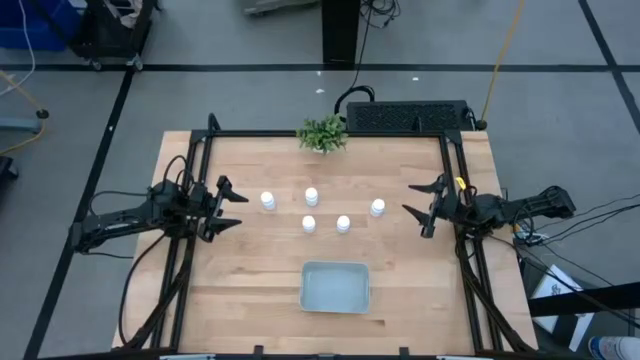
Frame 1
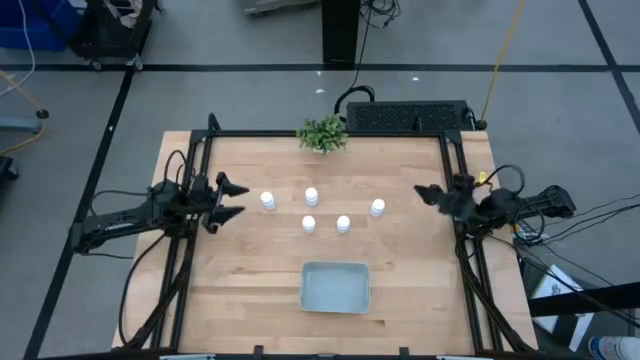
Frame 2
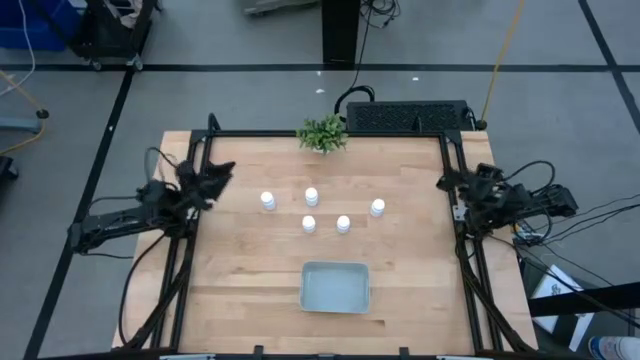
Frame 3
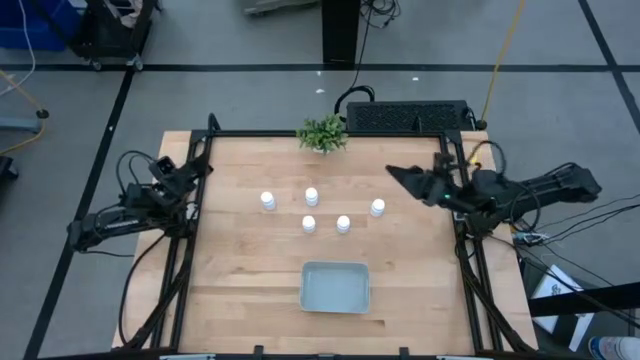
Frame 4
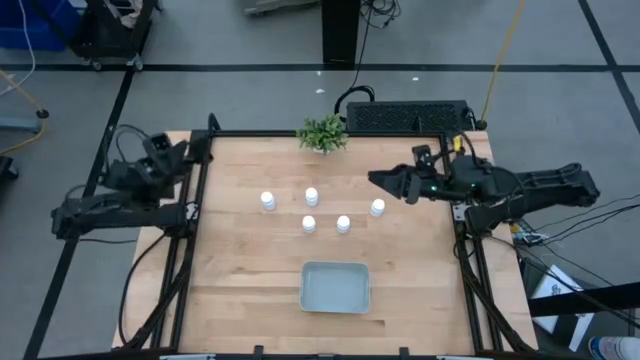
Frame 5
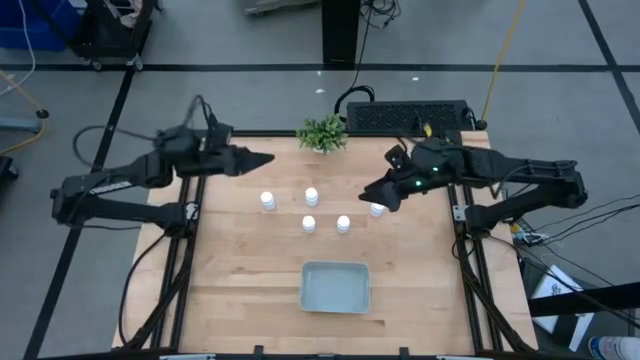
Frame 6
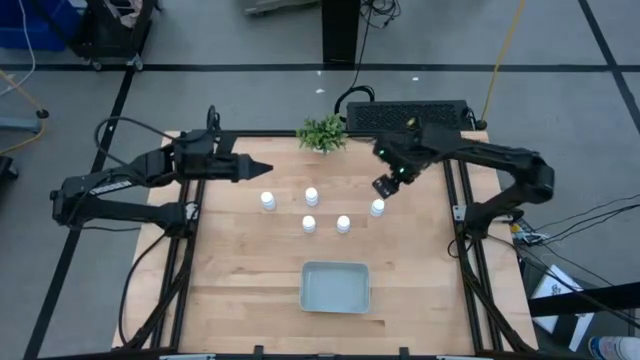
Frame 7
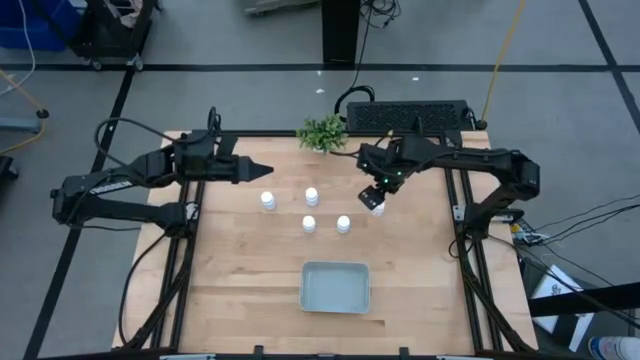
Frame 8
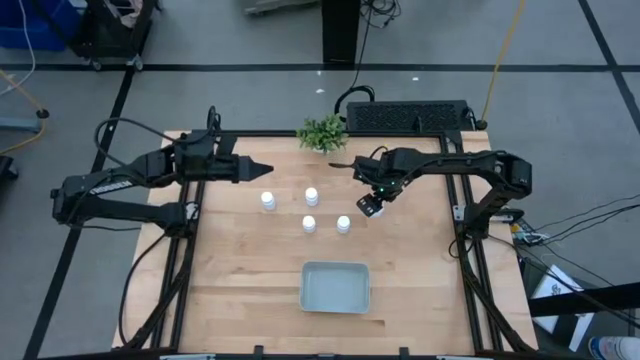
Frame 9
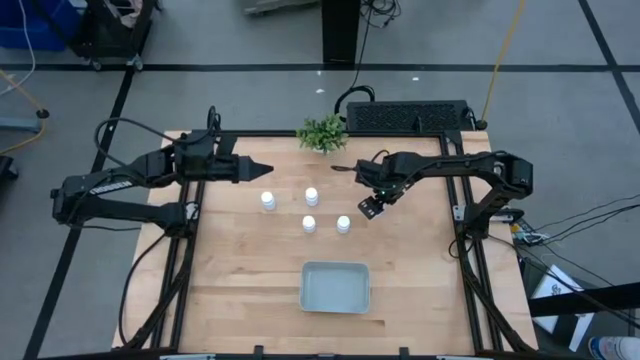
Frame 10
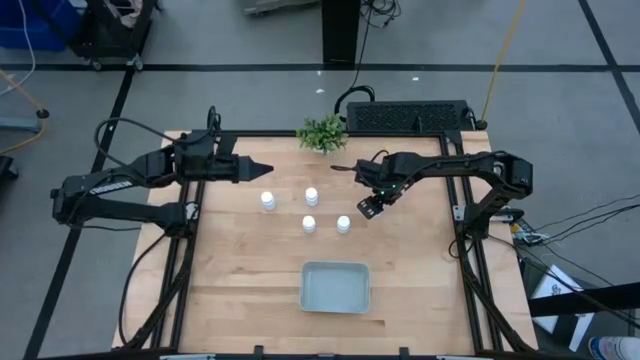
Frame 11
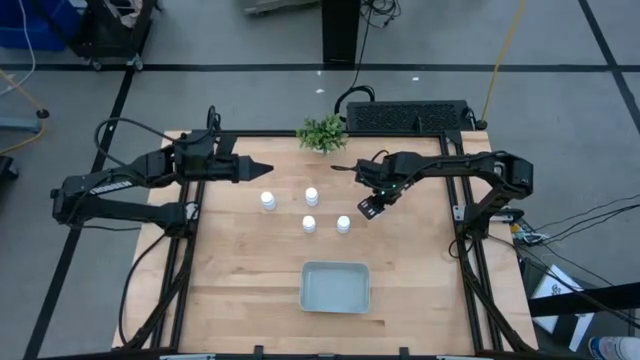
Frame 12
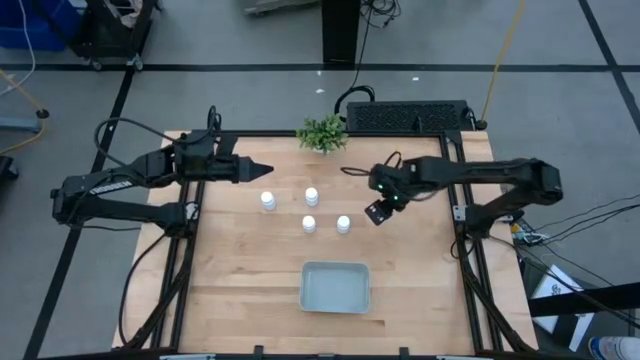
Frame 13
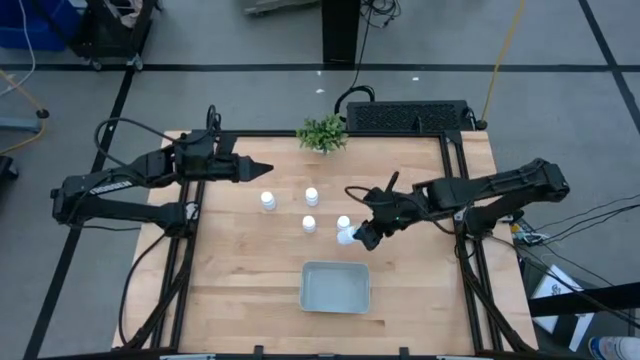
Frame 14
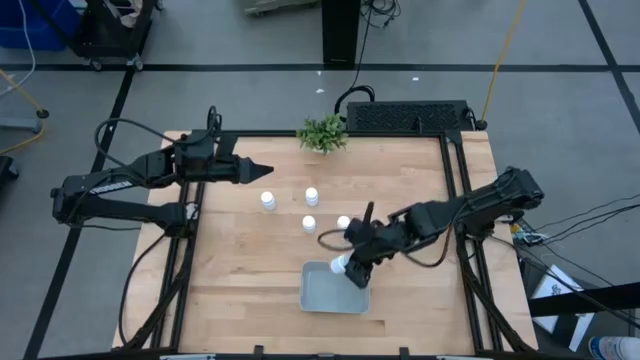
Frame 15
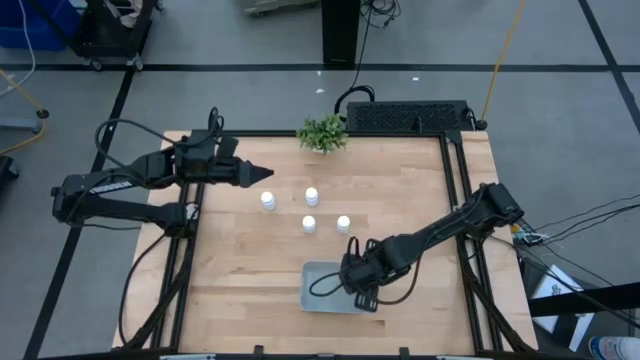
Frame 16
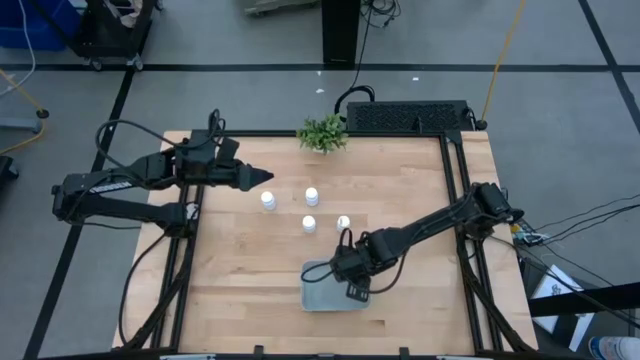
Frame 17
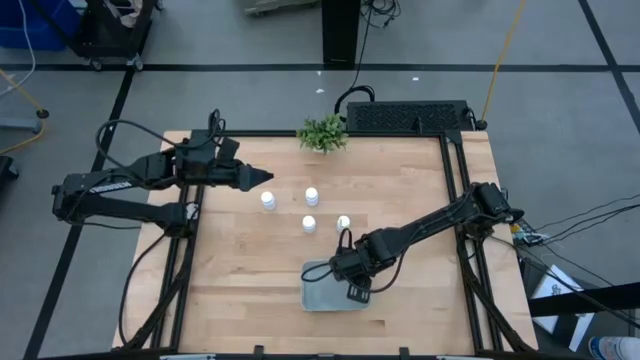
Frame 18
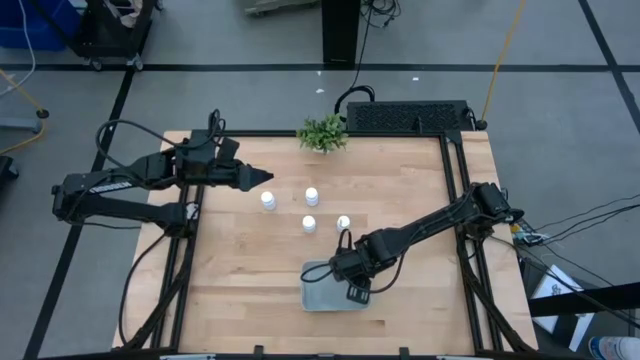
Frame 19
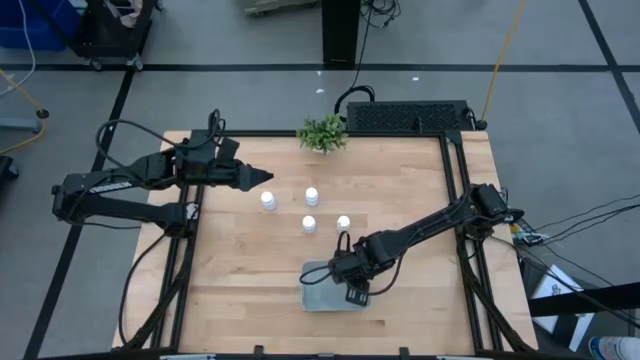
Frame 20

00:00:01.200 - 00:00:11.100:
Task: Pick and place pill bottles into a basket
Put the white medicine bottle into the gray bin

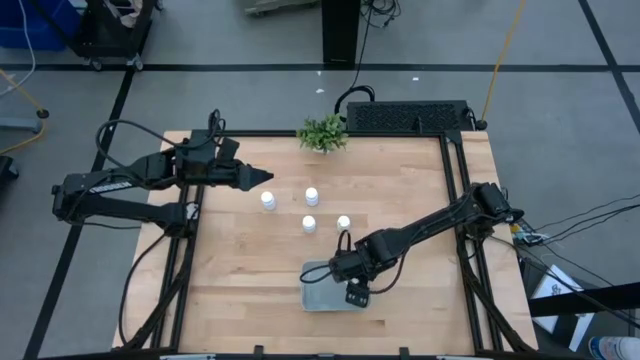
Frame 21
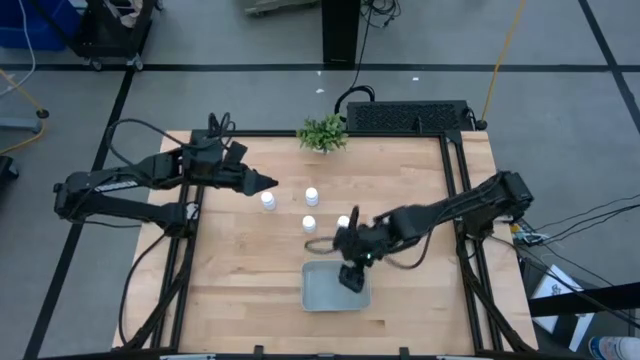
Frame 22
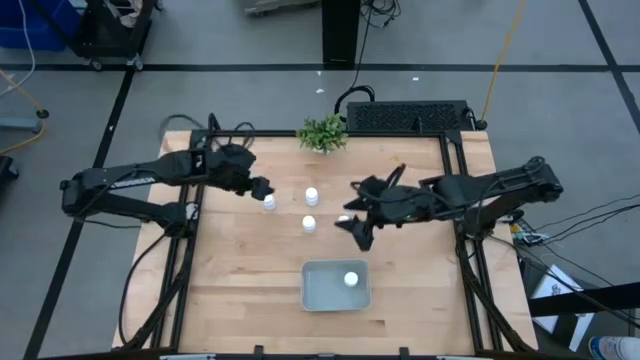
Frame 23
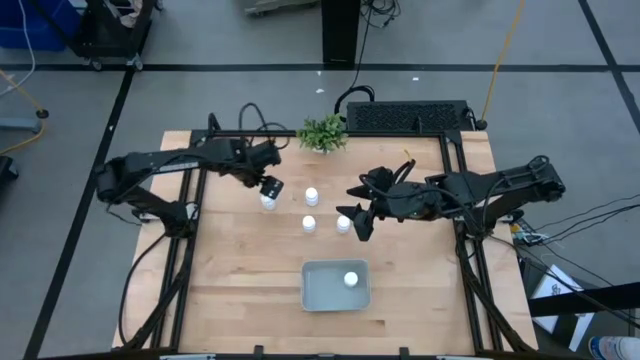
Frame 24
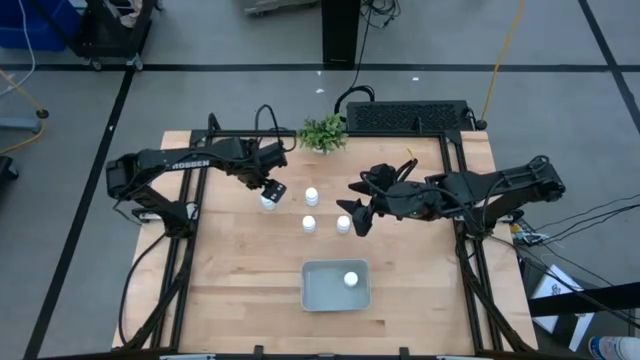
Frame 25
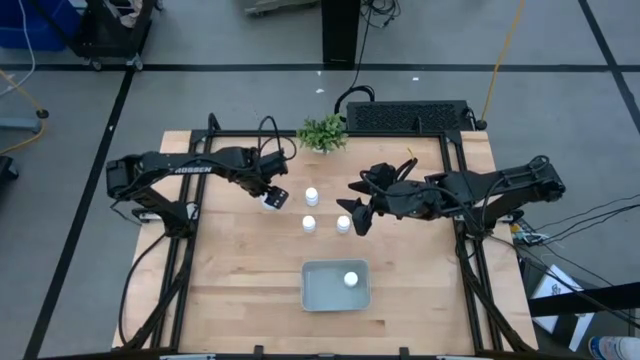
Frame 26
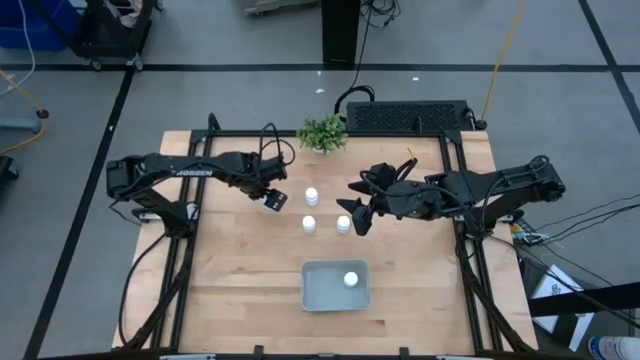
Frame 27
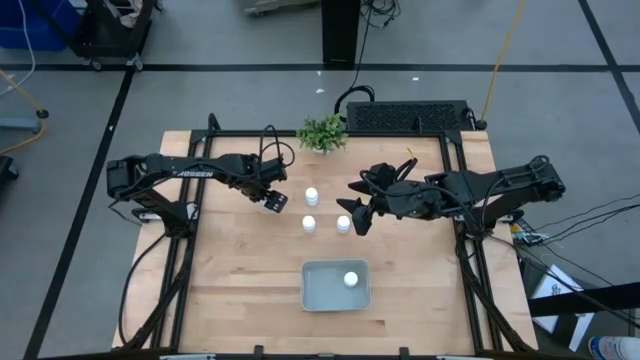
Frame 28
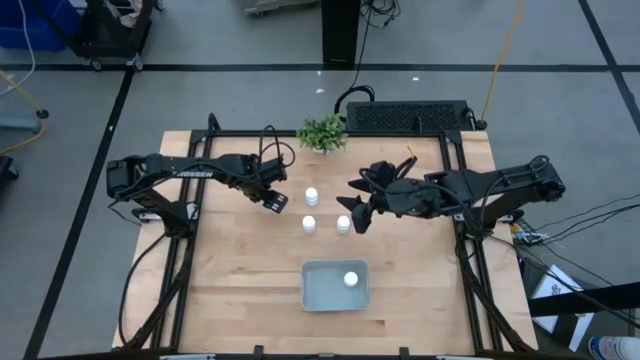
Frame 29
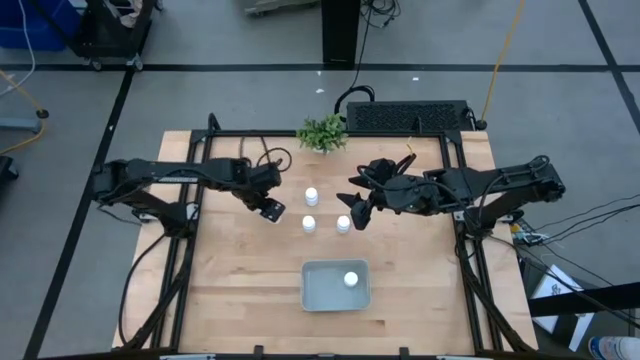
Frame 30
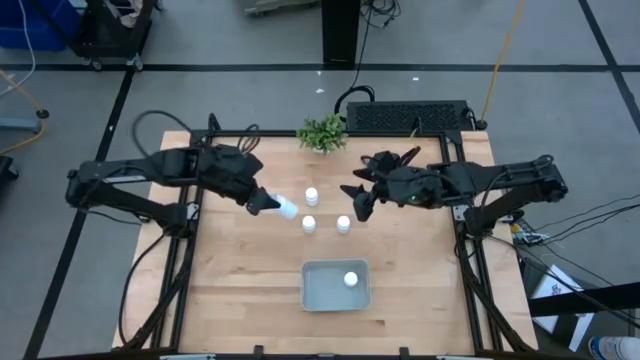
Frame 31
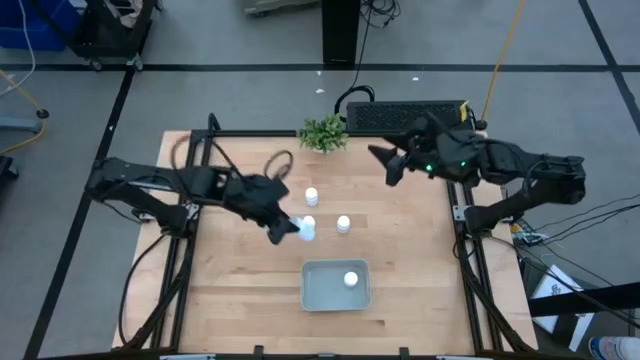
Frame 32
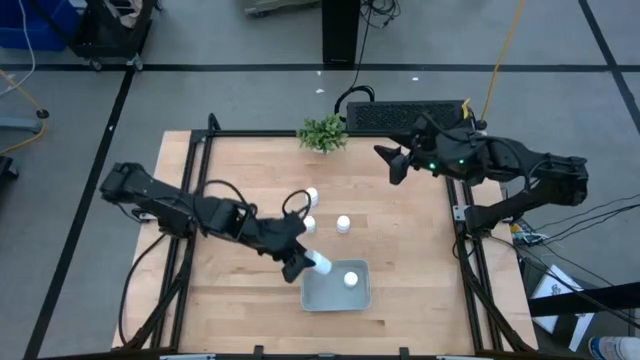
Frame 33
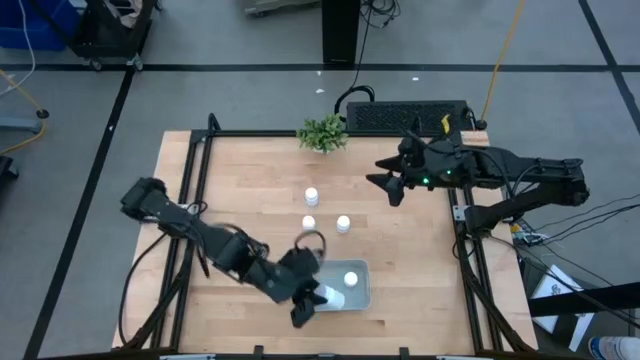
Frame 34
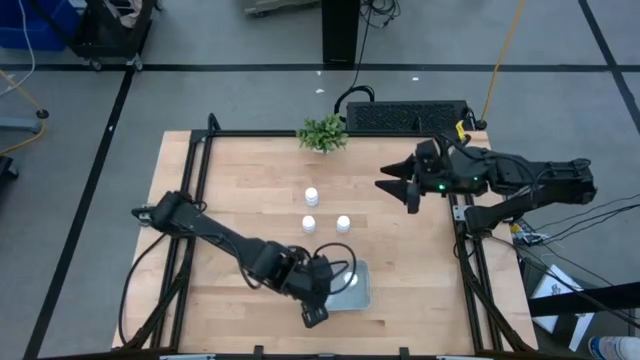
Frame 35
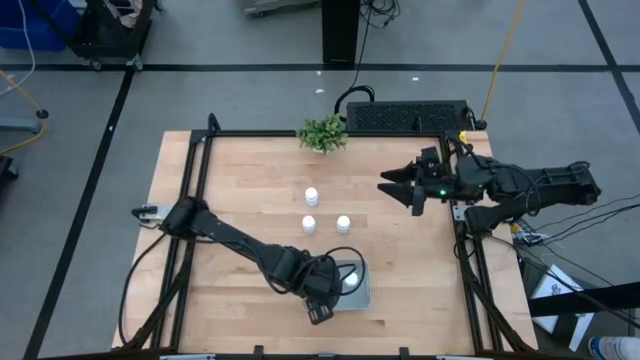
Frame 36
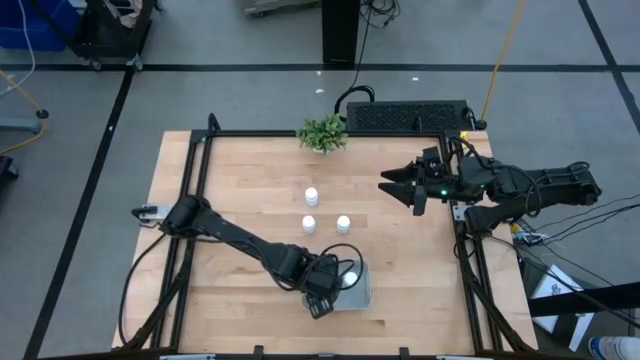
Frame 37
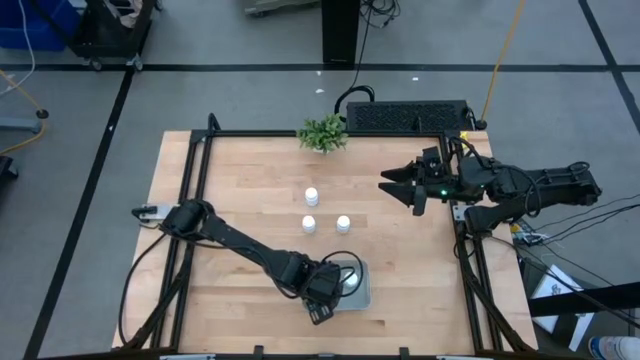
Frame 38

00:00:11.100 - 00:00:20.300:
Put the white medicine bottle into the gray bin

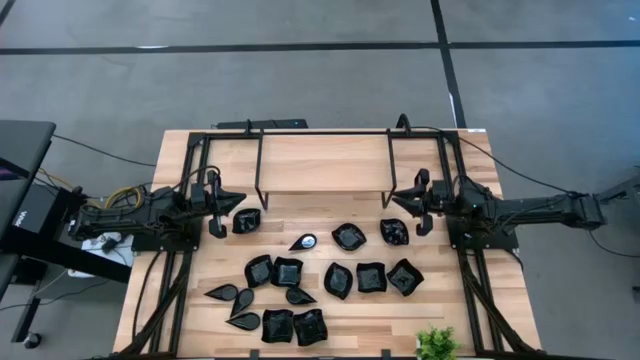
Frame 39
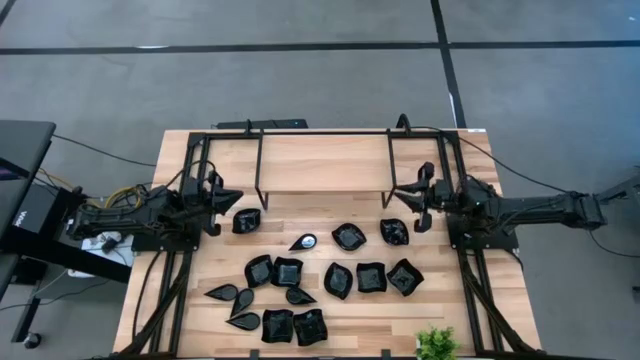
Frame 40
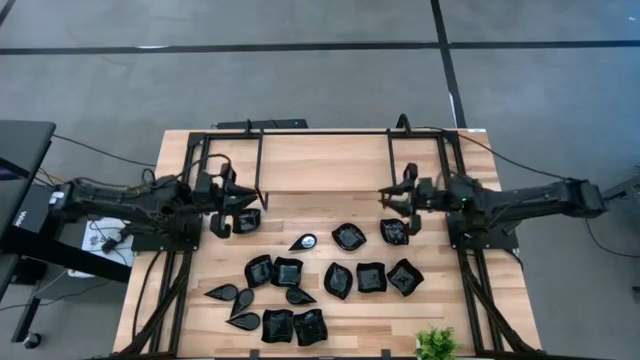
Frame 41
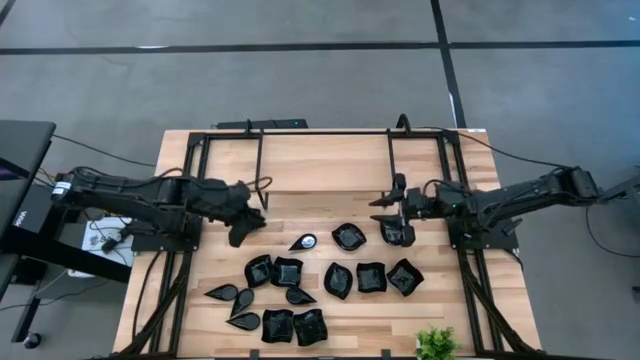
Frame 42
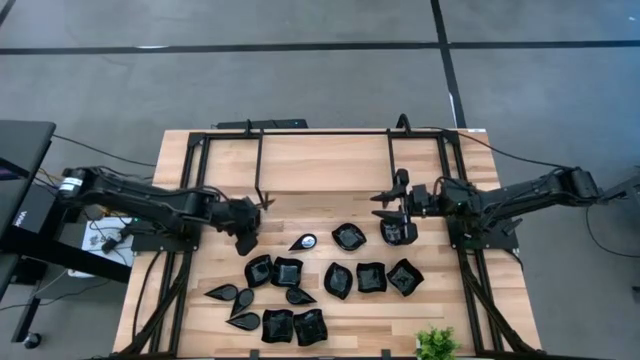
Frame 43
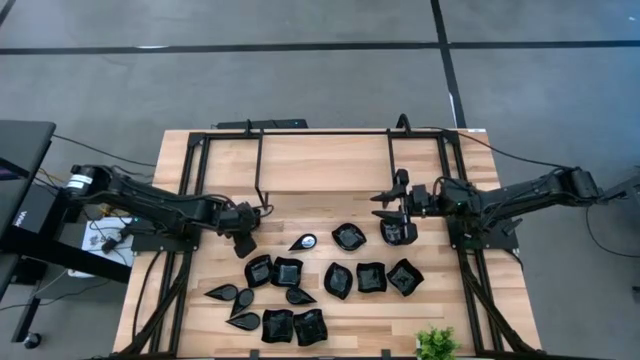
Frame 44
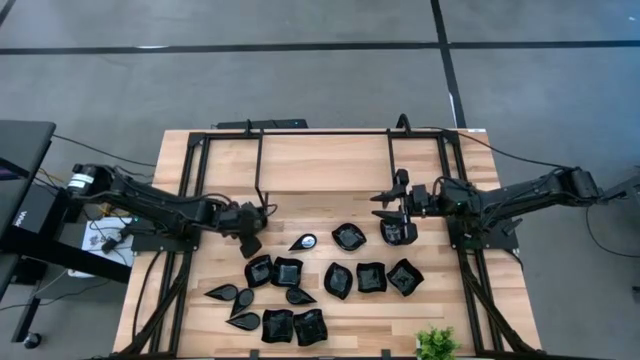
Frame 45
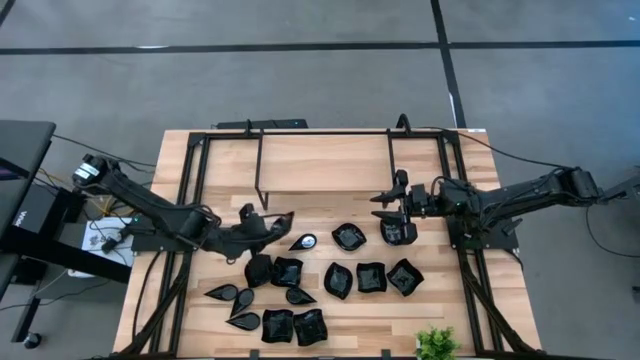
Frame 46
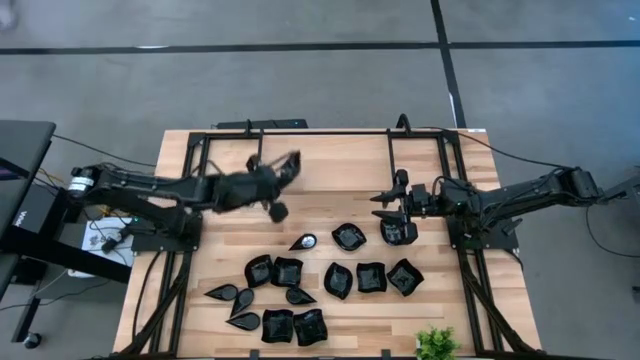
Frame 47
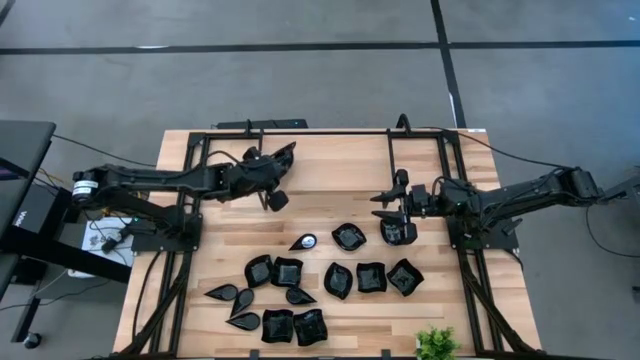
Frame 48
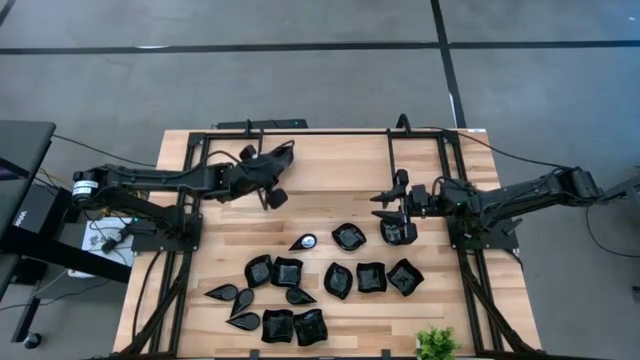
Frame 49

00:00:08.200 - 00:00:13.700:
Task: Pick & Place Mini shaped plates
Put the black leaf-shaped plate on the shelf
